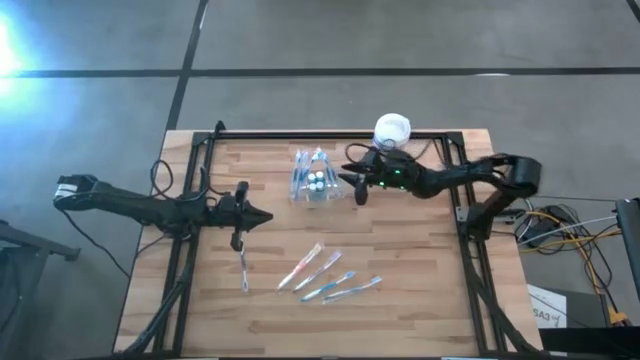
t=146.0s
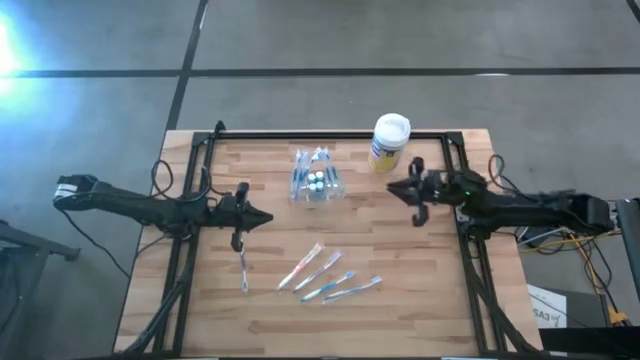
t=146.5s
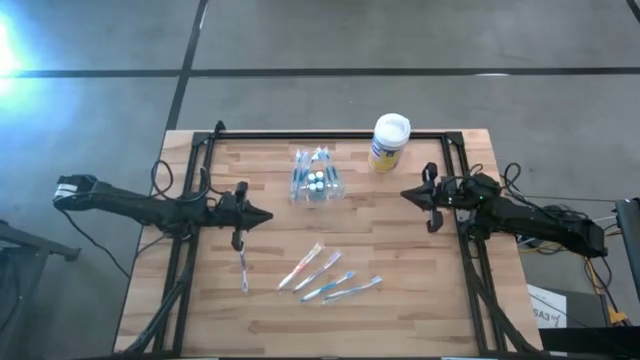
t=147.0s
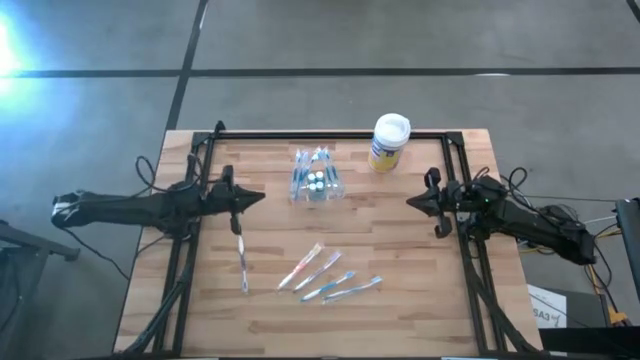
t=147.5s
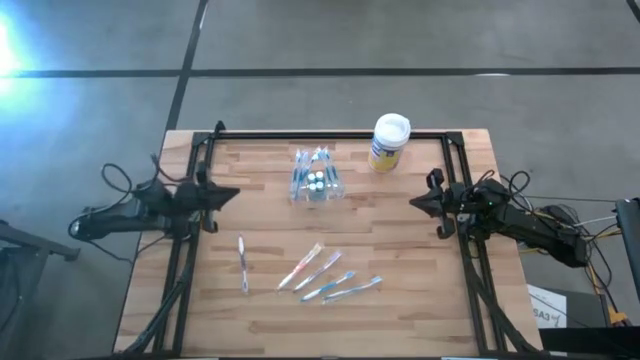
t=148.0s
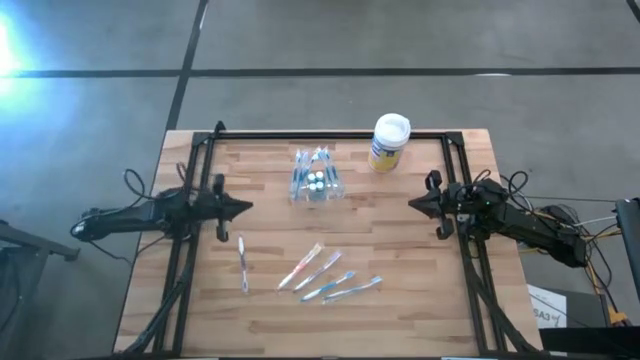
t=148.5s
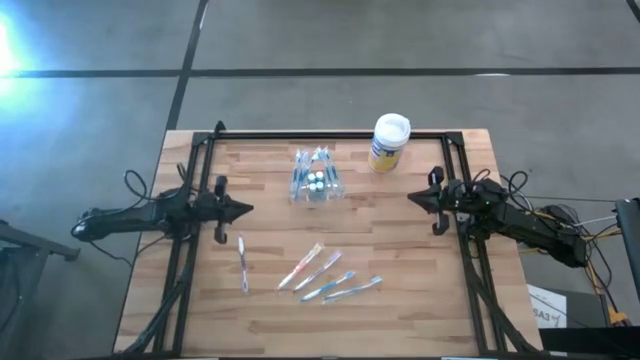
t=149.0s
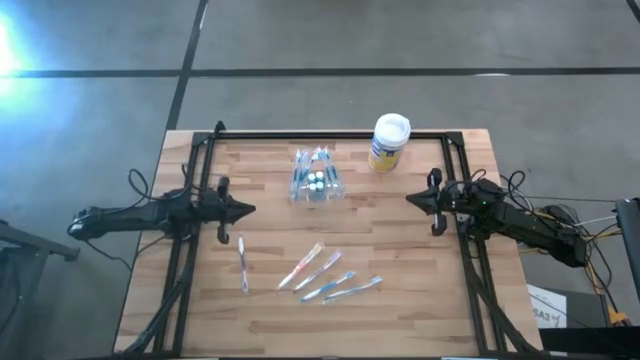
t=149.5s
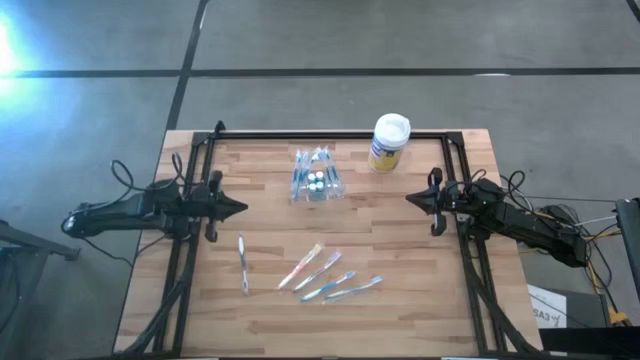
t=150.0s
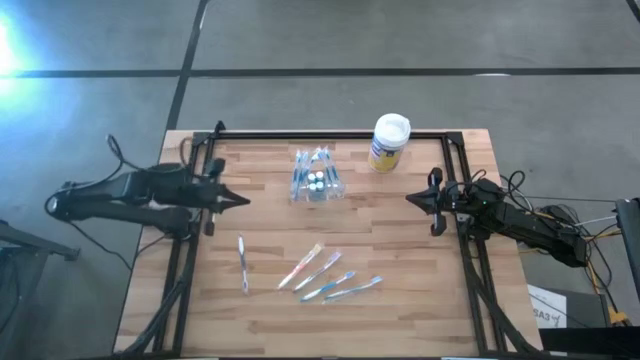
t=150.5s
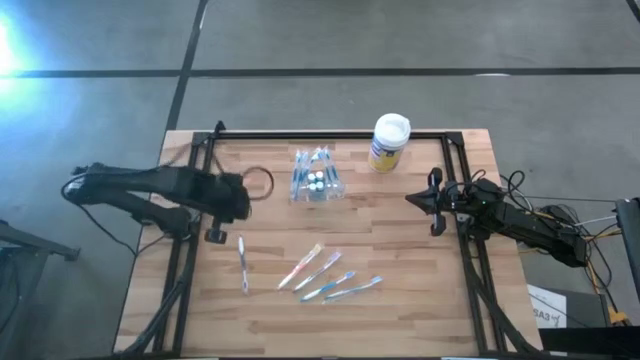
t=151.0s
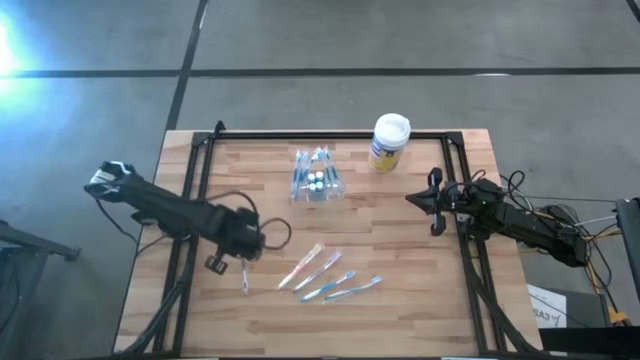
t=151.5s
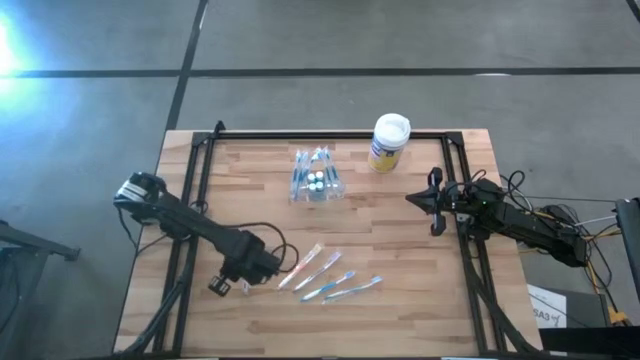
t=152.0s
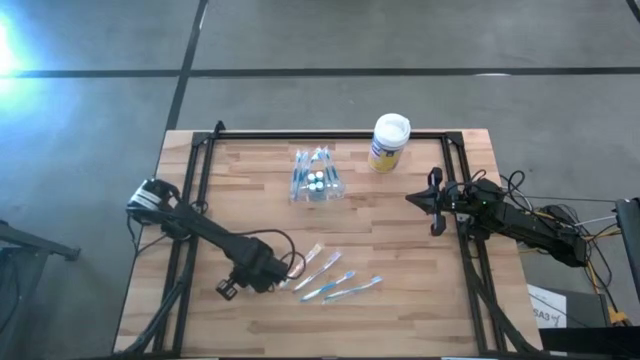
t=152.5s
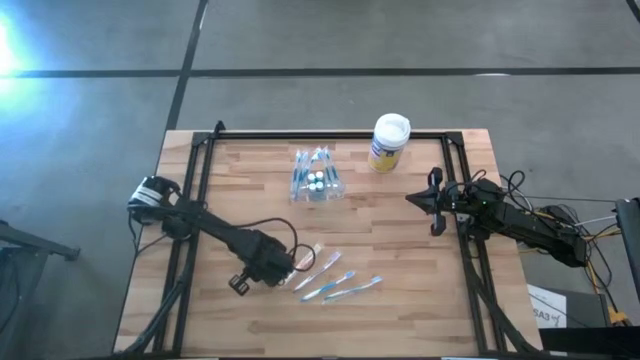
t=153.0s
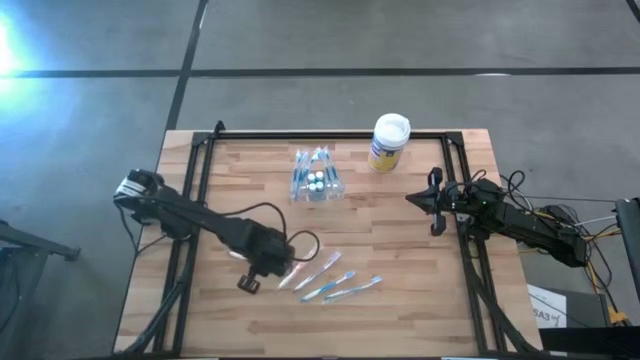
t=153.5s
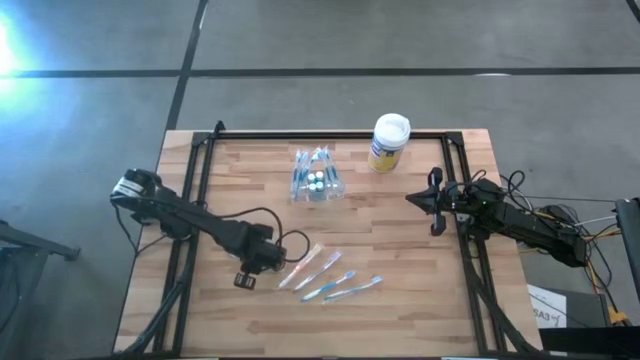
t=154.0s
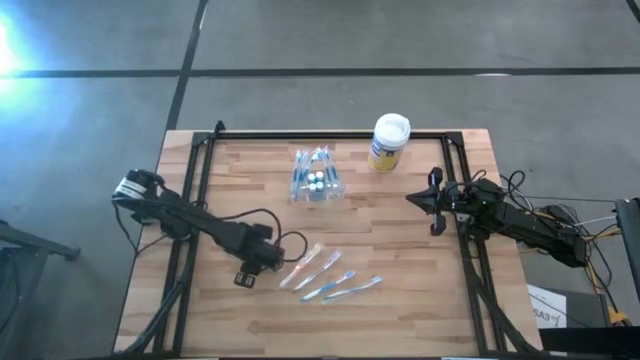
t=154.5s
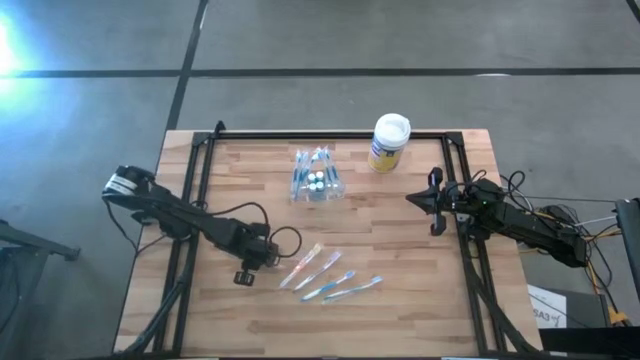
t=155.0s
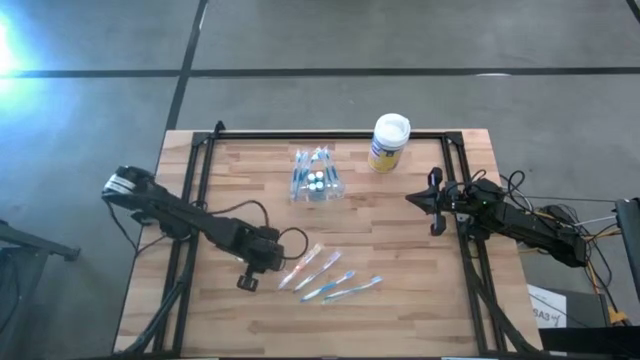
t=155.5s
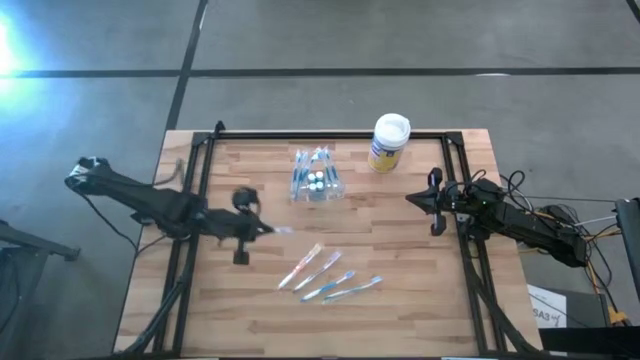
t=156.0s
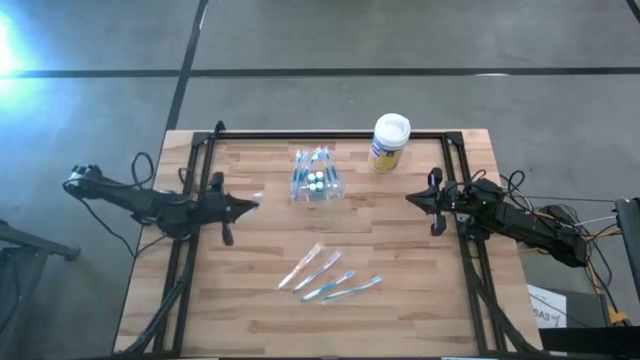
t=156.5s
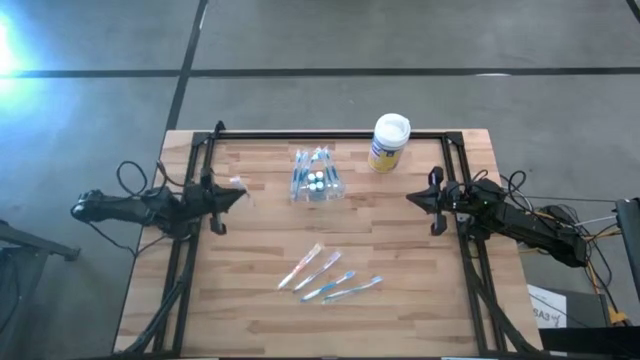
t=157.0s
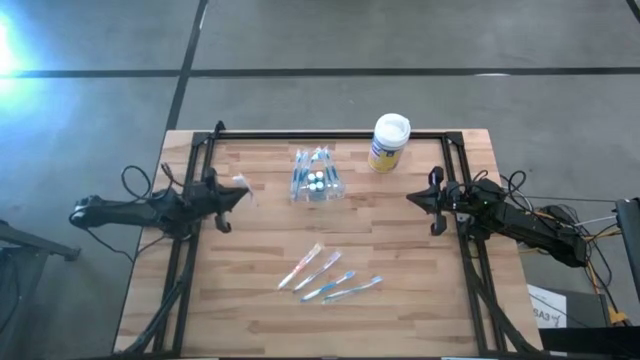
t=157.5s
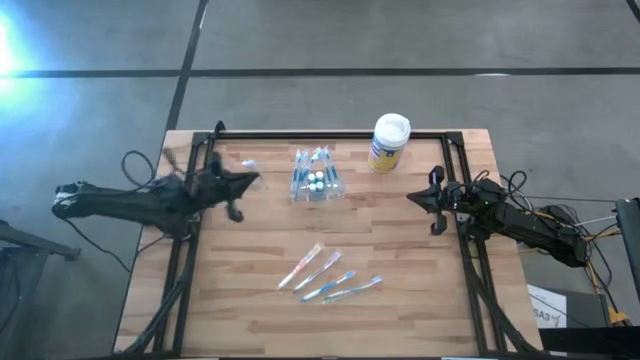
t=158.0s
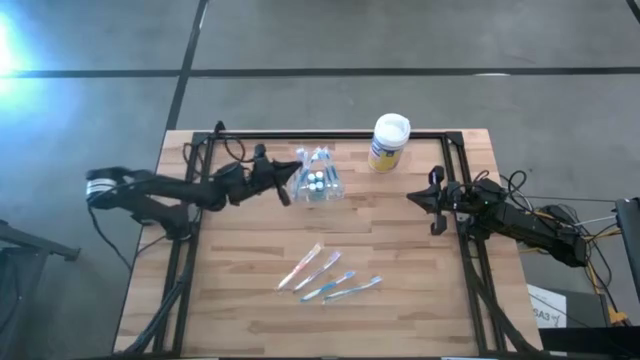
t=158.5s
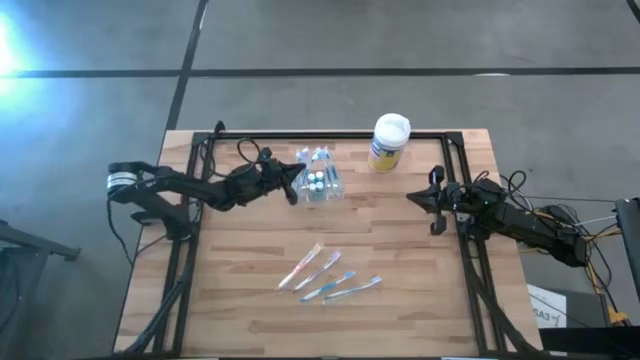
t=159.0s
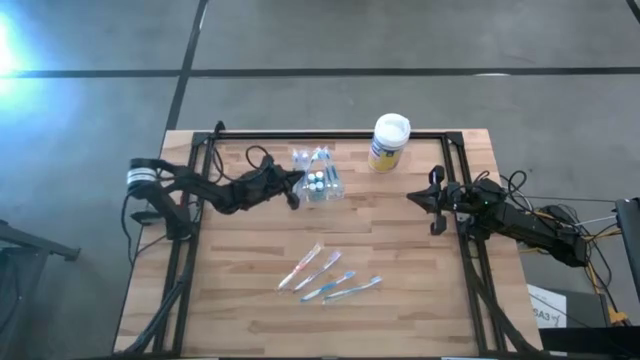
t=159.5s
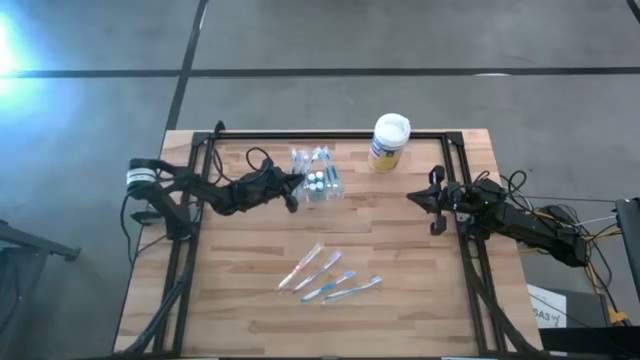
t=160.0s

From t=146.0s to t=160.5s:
Task: Pick & Place toothbrushing station
Put the violet toothbrush into the transparent organizer

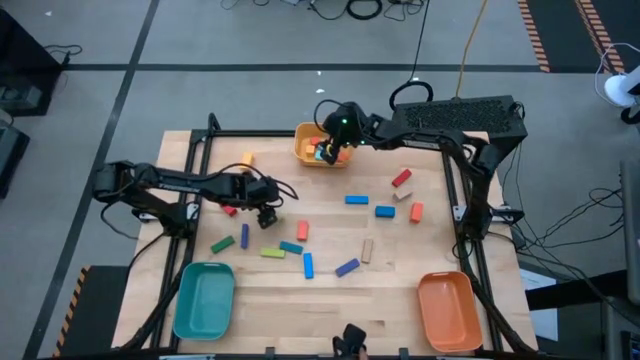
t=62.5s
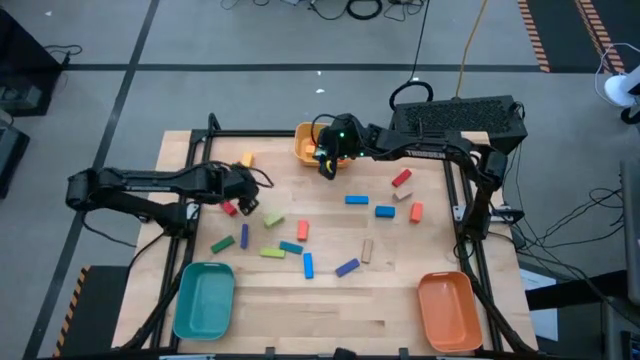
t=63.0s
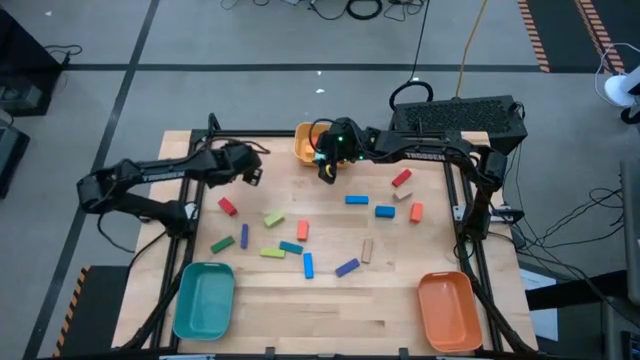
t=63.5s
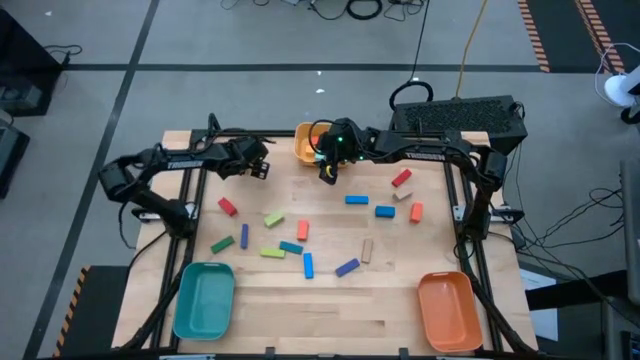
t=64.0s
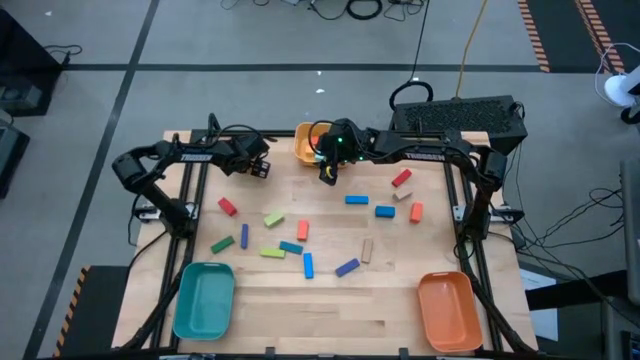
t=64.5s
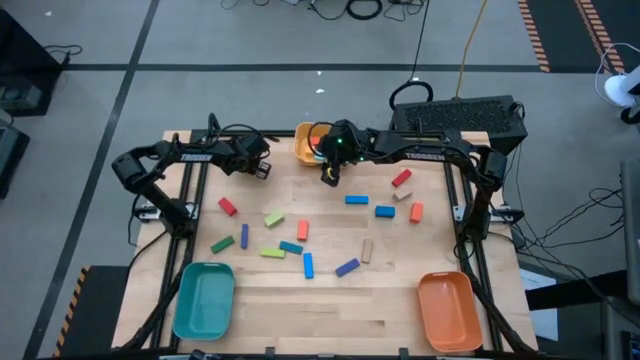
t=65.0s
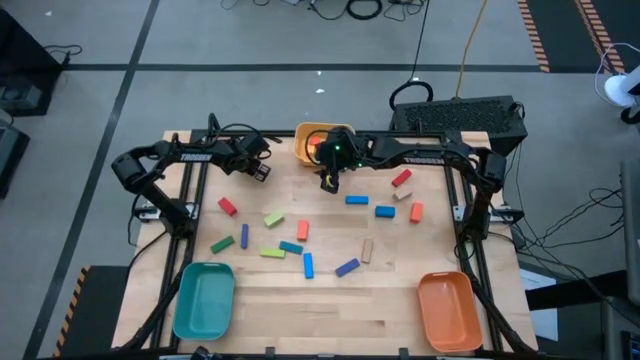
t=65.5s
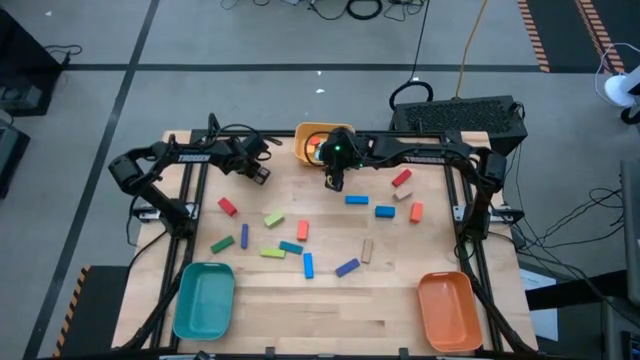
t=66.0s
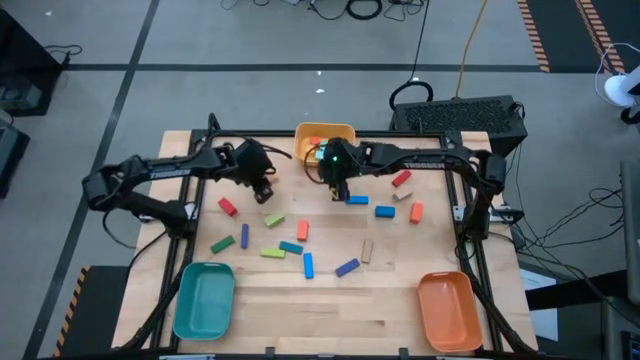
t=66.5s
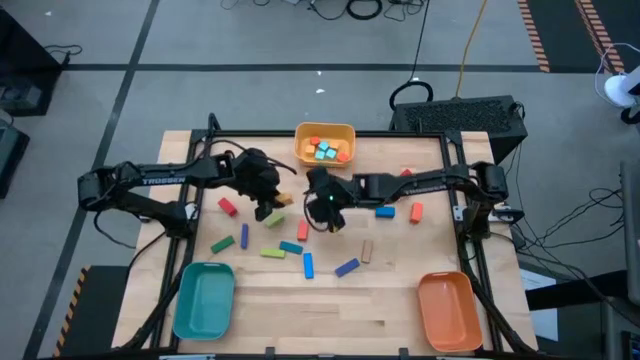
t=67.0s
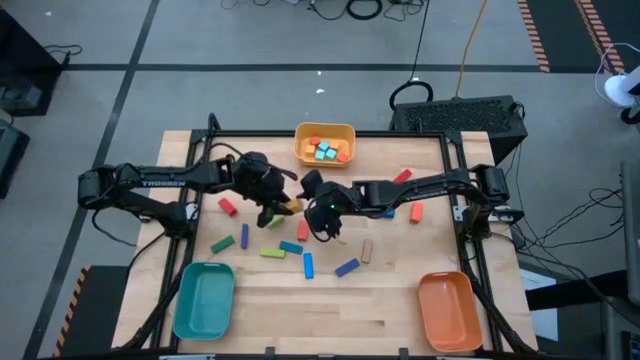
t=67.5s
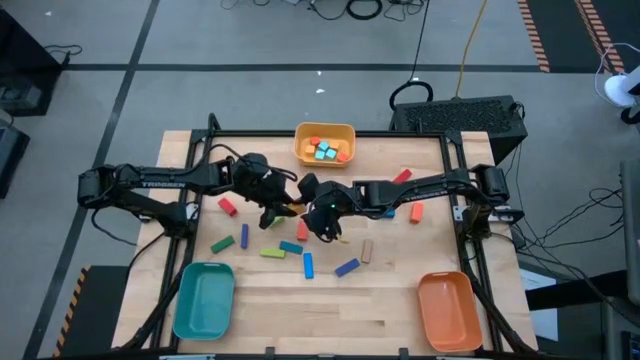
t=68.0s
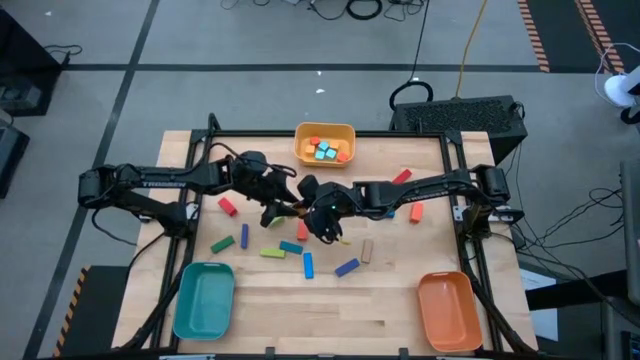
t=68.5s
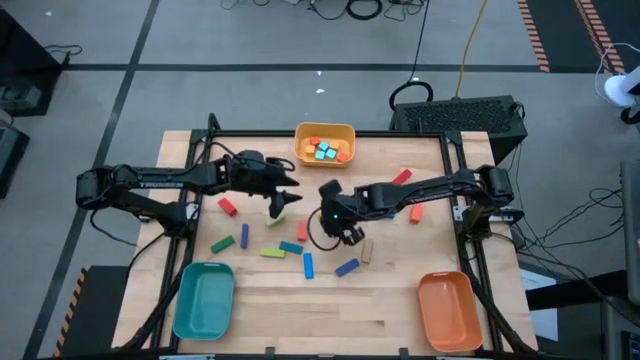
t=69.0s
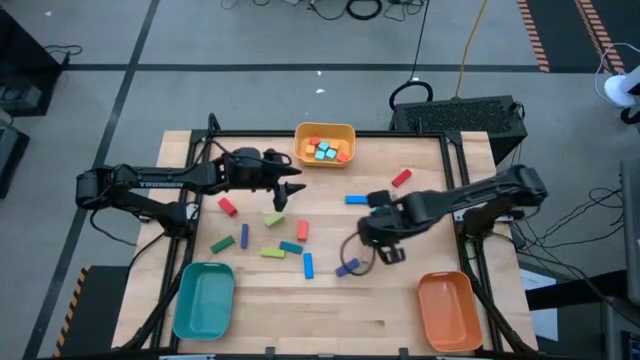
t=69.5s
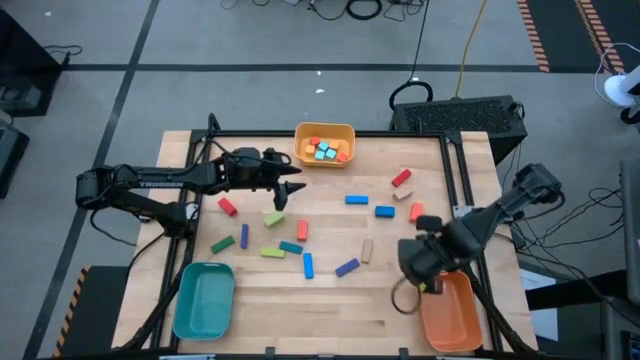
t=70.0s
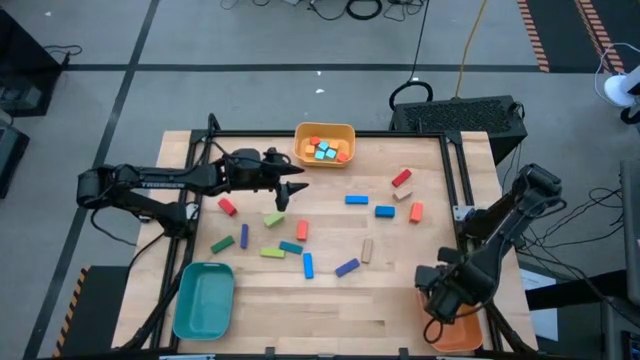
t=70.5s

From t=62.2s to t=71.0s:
Task: Sort blocks by size
Put the big yellow rectangle block into the orange bin
